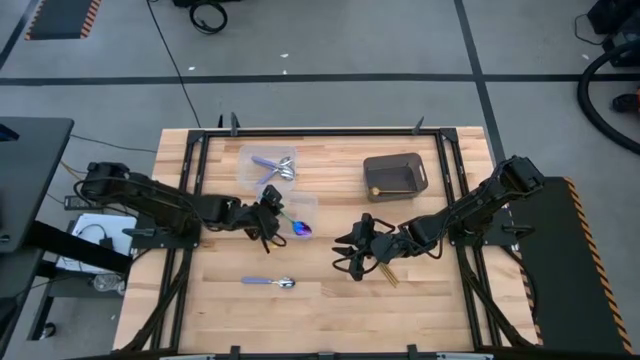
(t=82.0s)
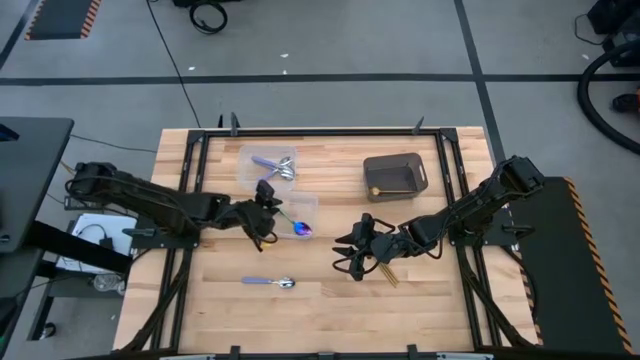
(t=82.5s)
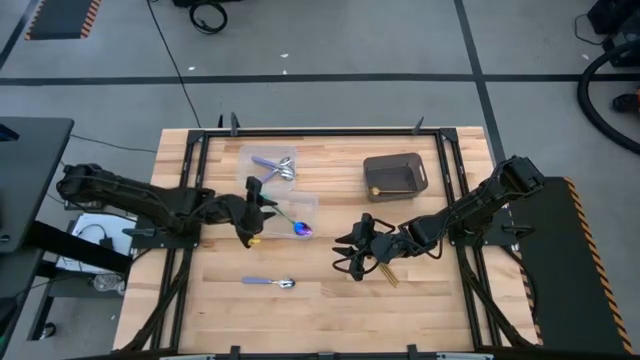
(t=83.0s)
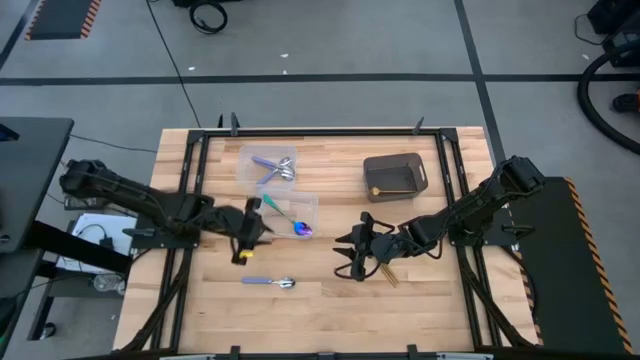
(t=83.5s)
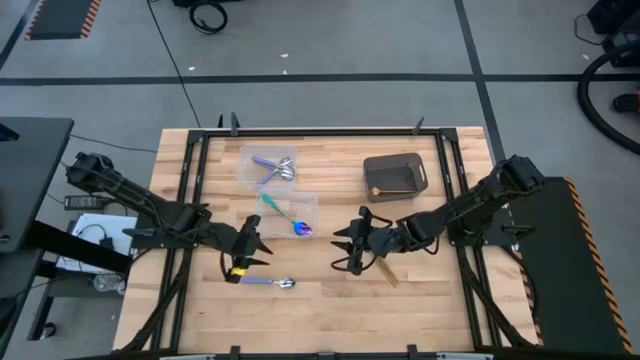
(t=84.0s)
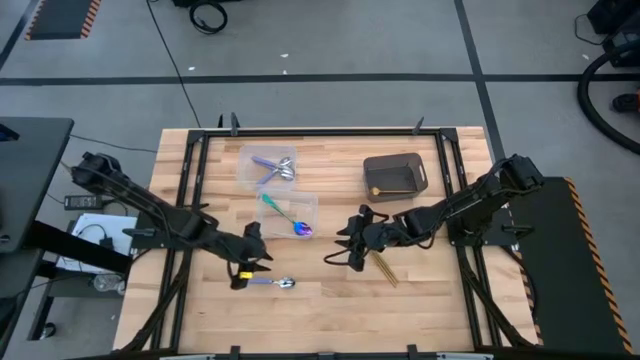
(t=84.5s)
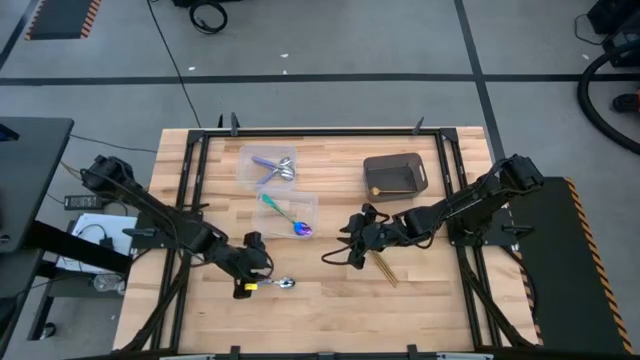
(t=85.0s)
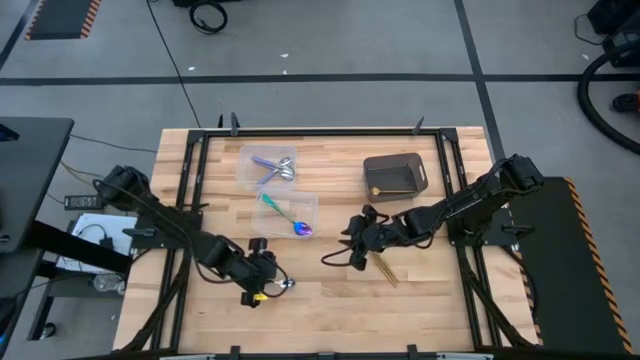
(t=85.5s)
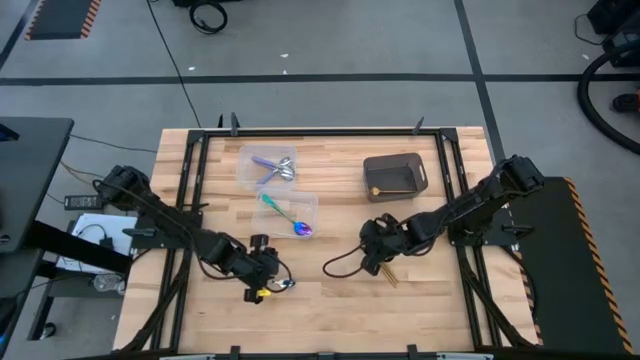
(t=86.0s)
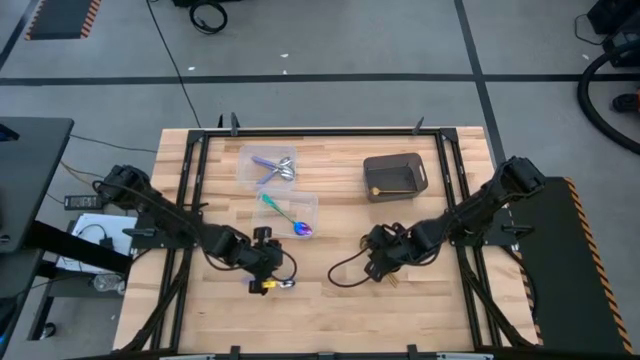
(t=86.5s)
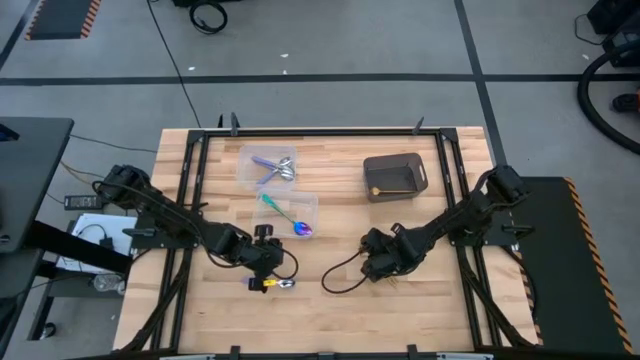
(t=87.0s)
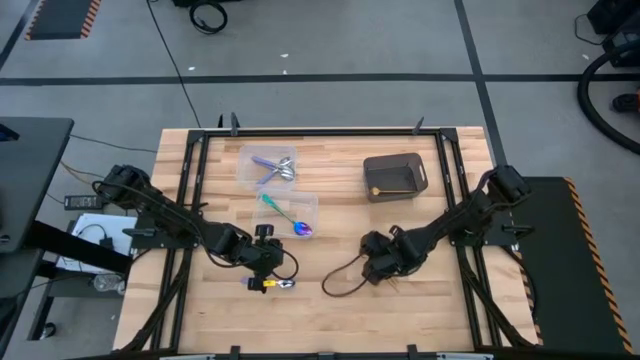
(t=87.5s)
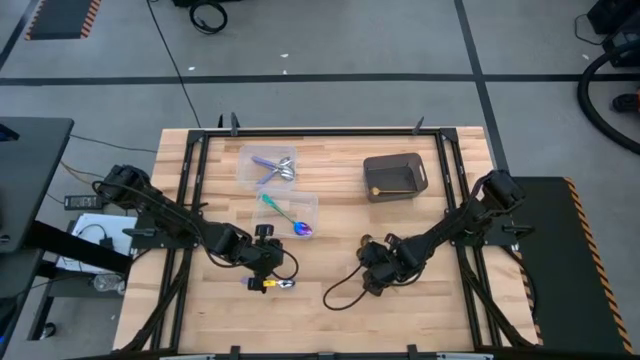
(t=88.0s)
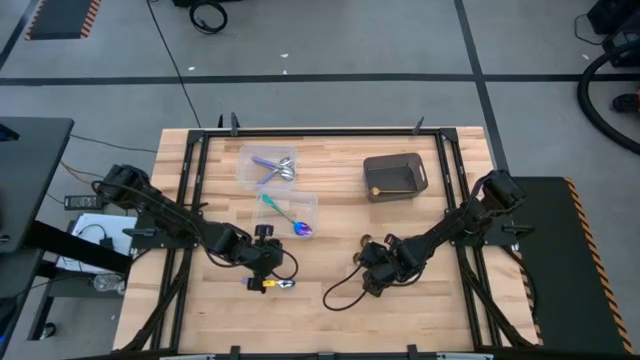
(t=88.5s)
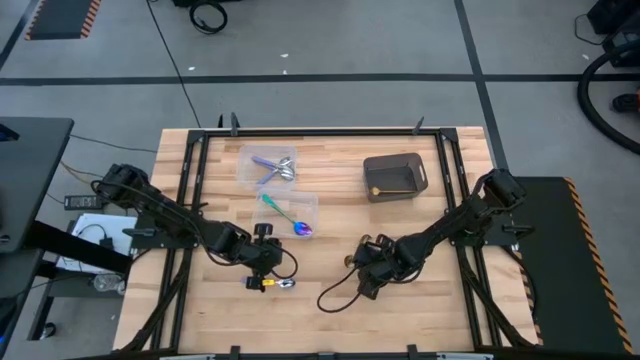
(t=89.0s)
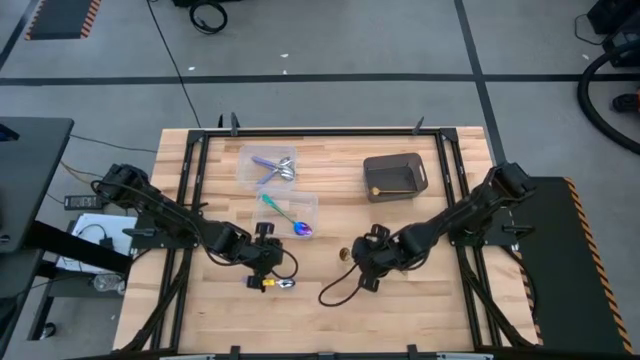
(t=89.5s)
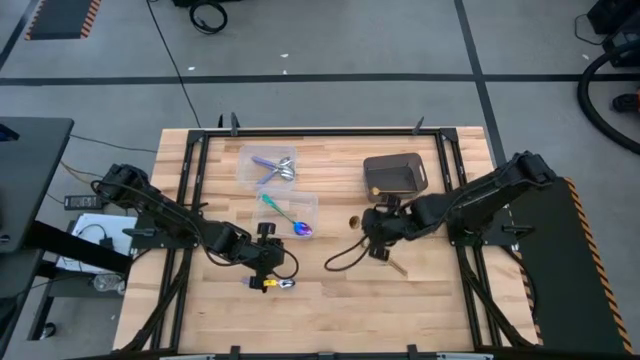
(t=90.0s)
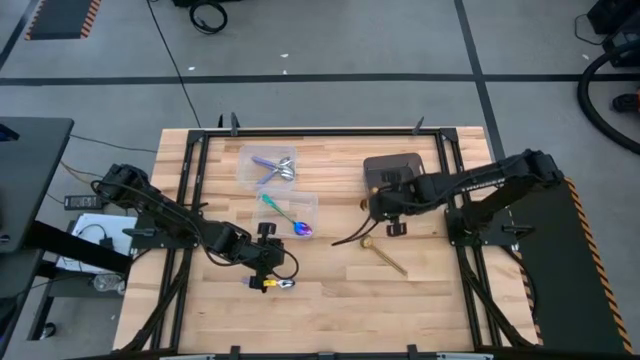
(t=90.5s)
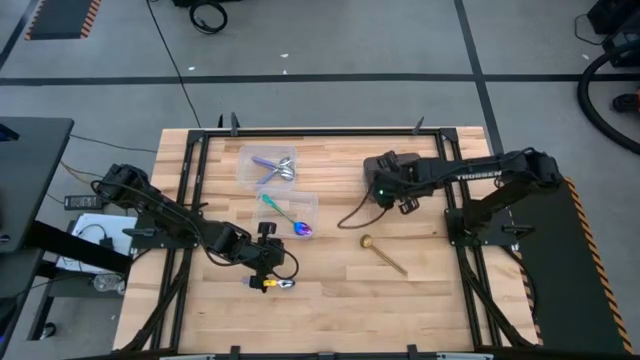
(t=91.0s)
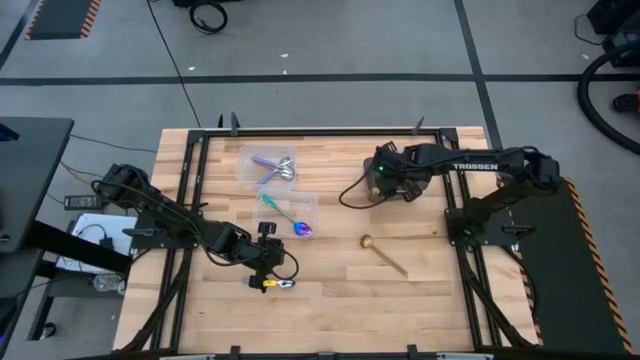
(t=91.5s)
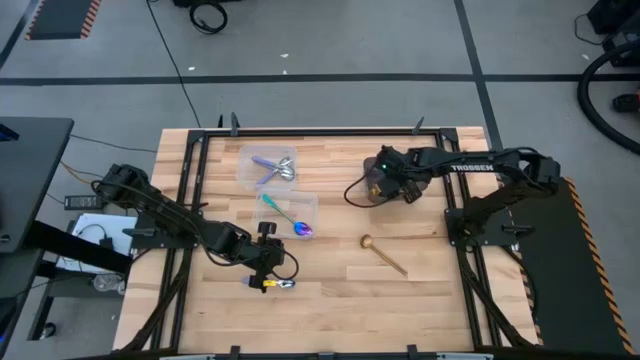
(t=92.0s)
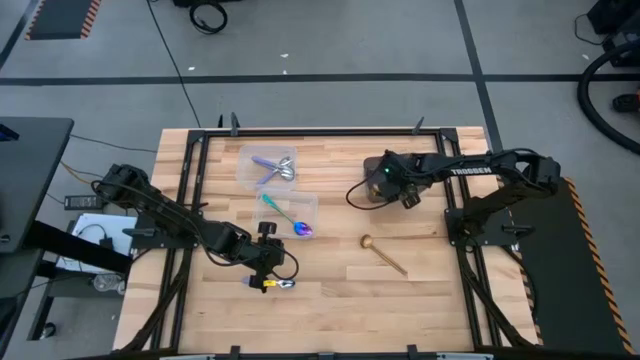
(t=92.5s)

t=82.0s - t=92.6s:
Task: Sort silverware by color (type)
Put the gold spoon into the black bin

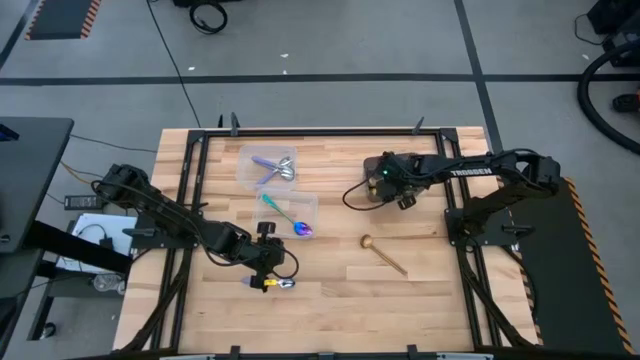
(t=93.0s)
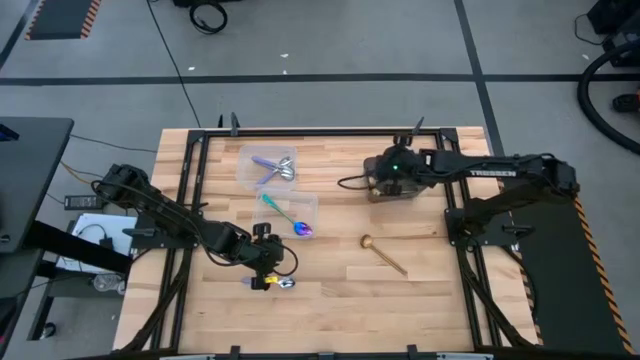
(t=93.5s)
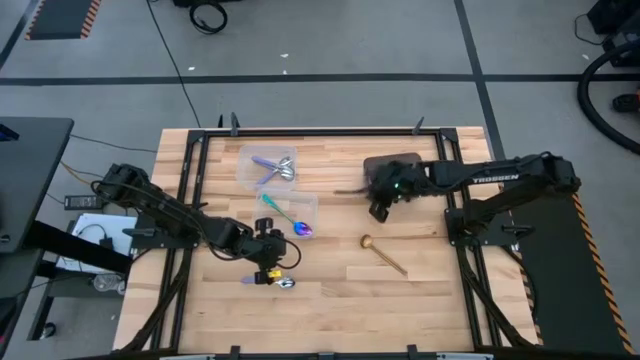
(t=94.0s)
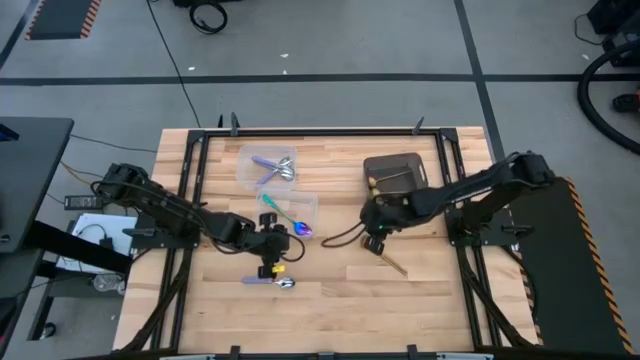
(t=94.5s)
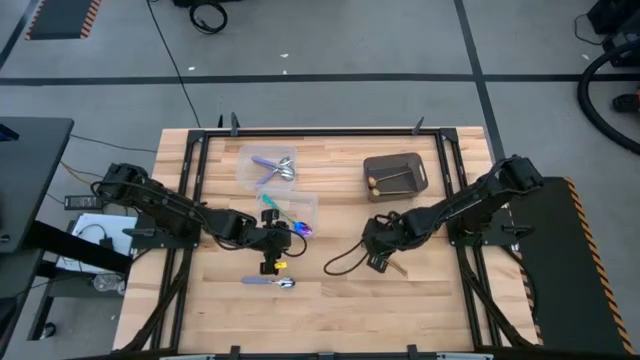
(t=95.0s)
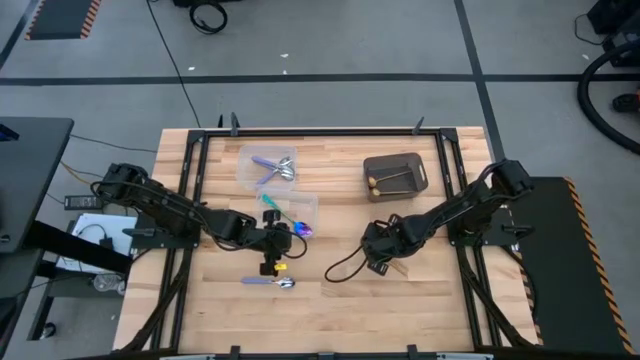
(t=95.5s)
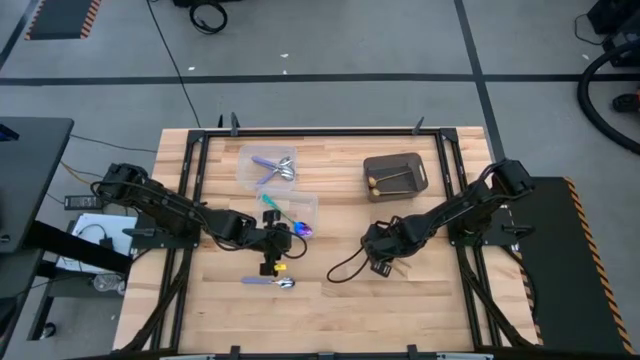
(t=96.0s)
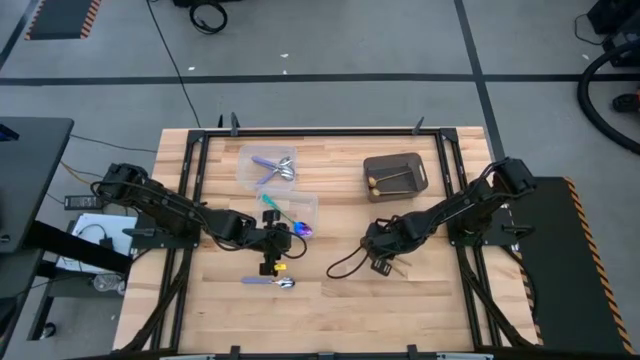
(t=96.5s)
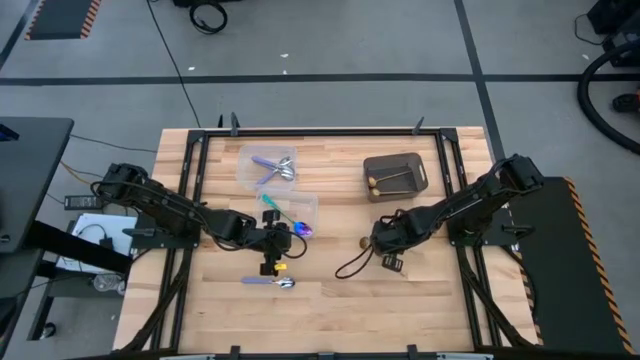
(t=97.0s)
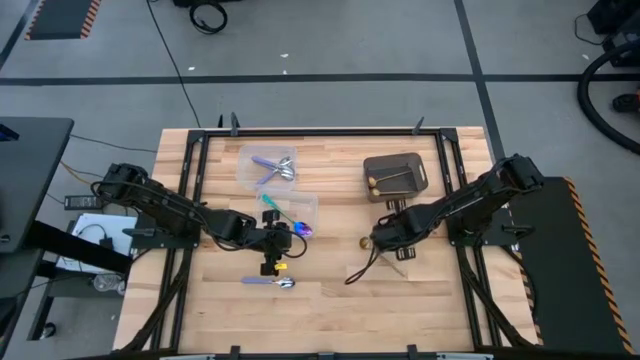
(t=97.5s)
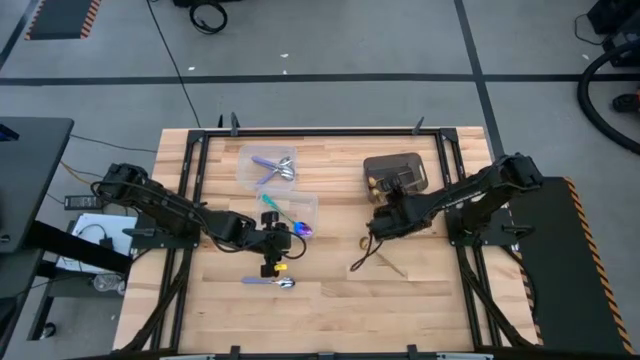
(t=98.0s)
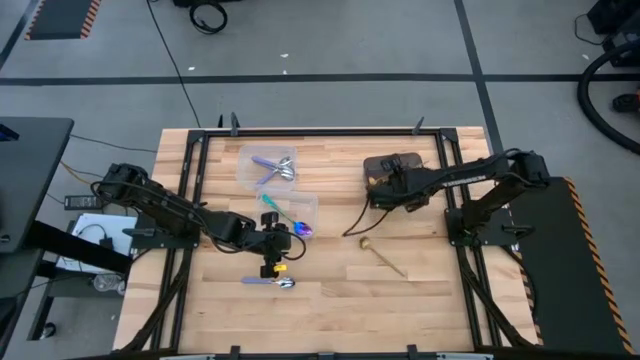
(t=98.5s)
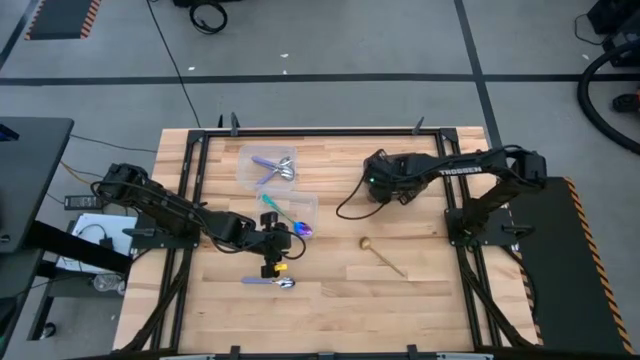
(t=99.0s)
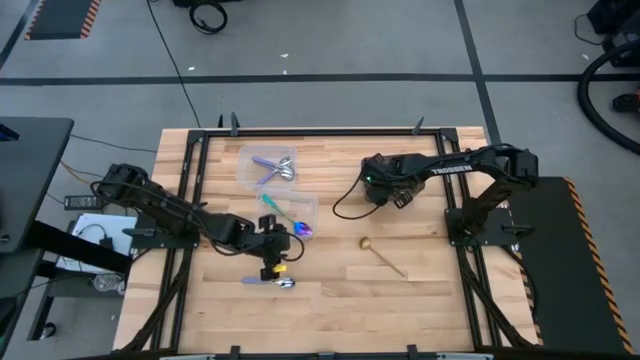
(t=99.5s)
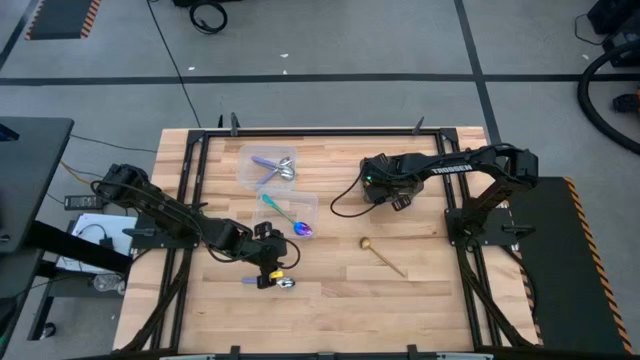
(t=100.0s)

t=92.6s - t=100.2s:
Put the gold spoon into the black bin

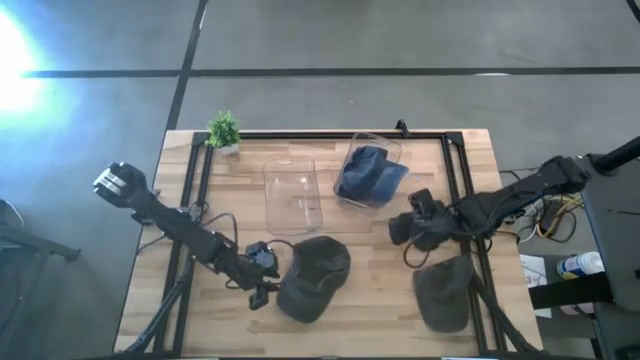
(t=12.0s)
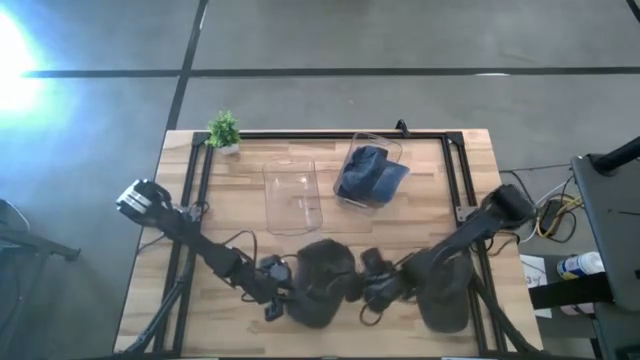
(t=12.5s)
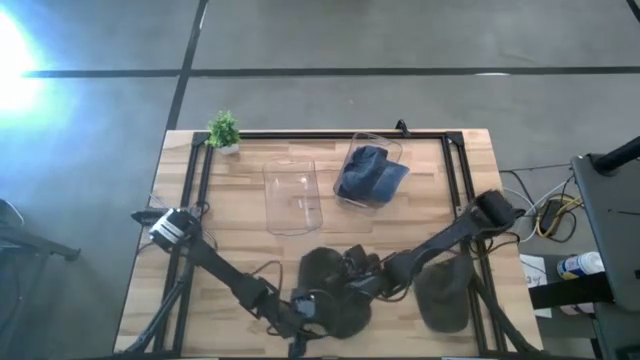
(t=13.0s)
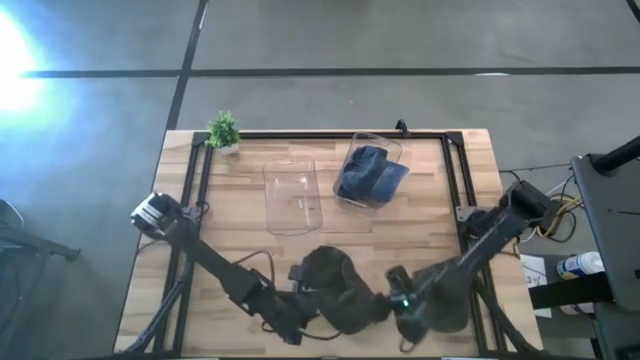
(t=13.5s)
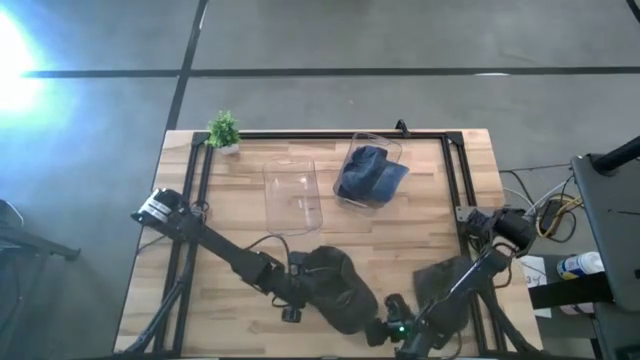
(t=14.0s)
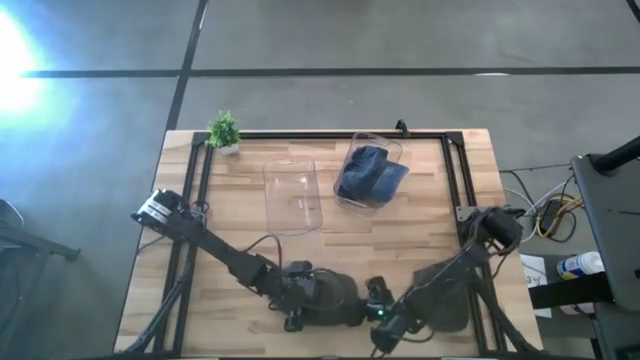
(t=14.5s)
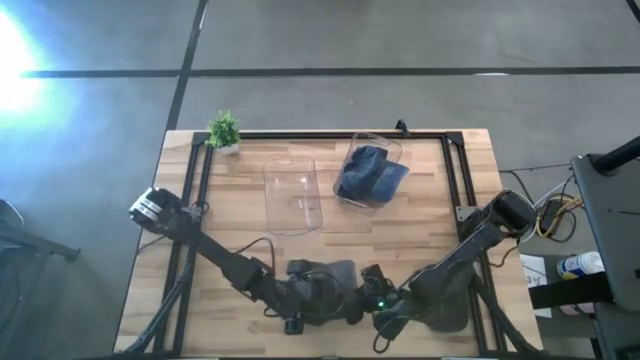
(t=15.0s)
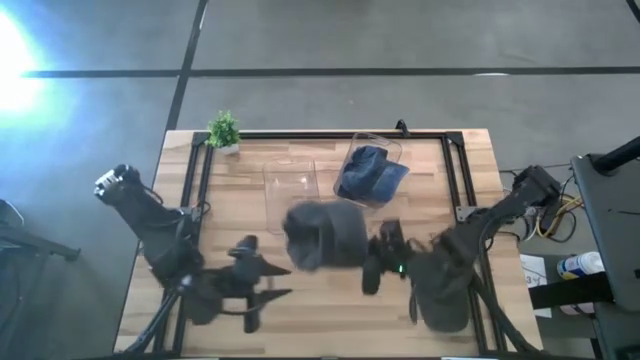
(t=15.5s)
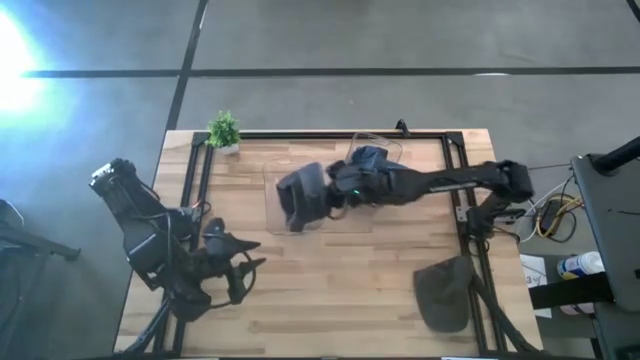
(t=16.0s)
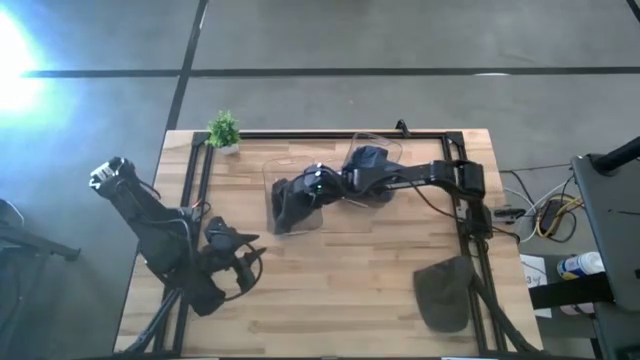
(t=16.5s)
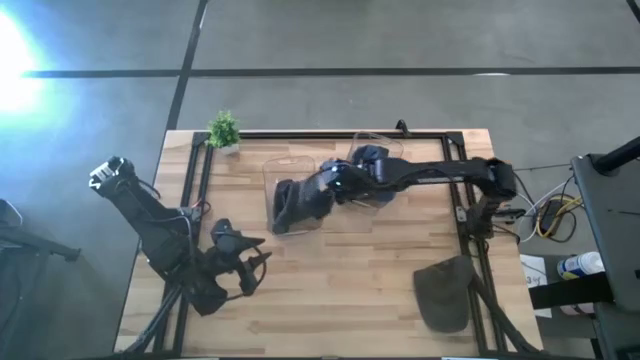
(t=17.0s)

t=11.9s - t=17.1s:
Task: Pick & Place hat
Put the left black cap into the left transparent bin
